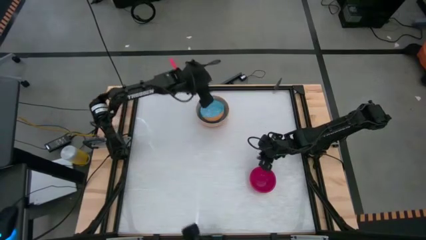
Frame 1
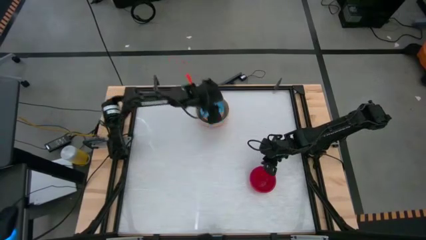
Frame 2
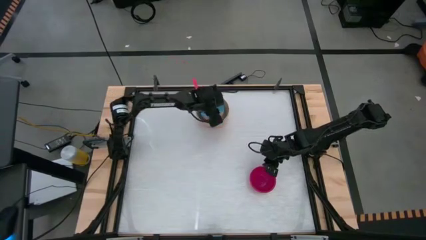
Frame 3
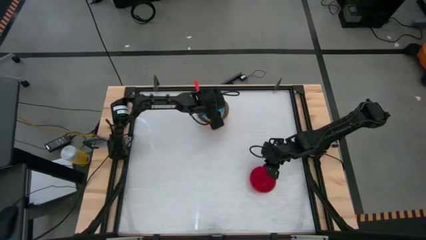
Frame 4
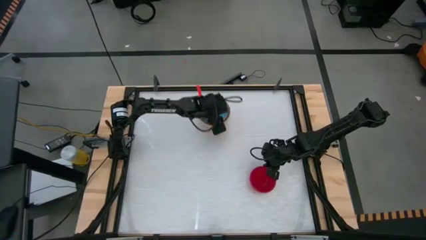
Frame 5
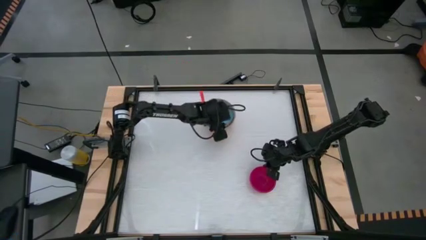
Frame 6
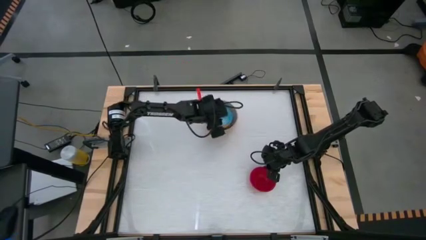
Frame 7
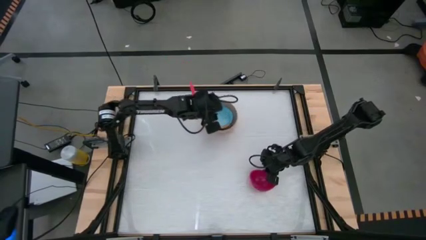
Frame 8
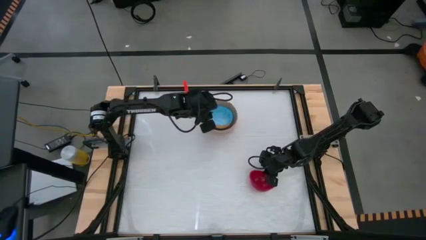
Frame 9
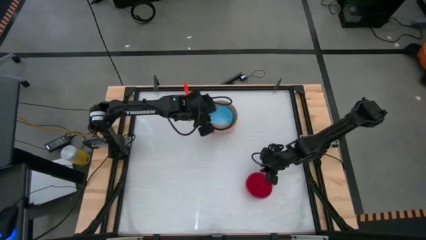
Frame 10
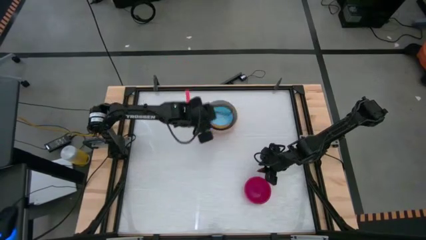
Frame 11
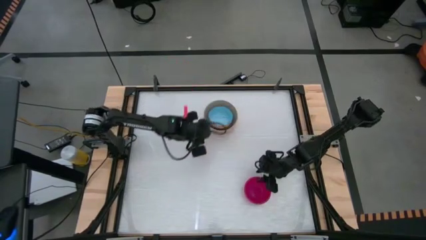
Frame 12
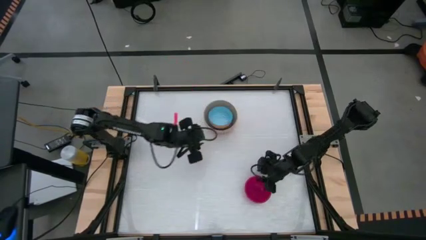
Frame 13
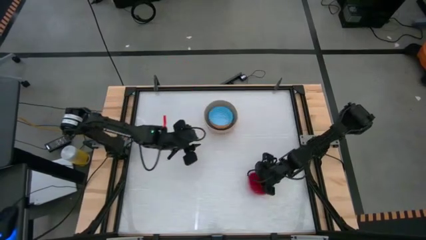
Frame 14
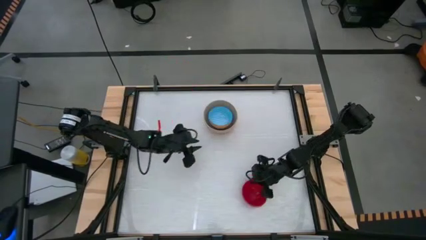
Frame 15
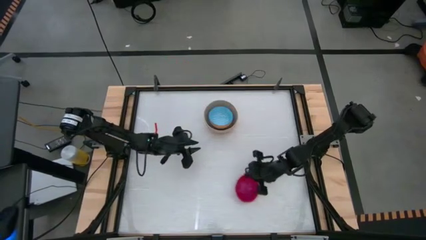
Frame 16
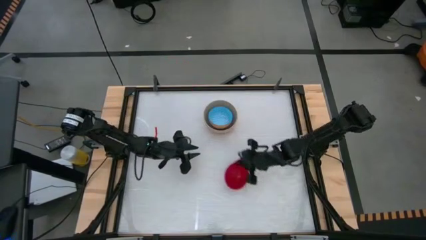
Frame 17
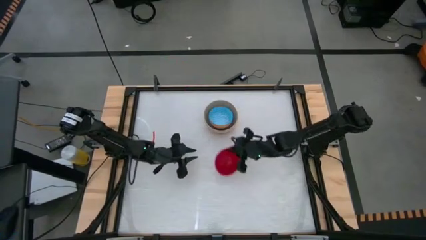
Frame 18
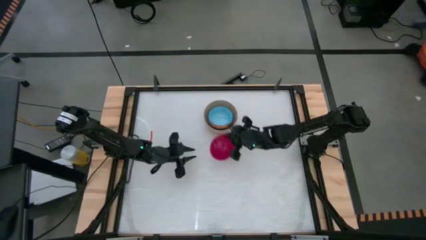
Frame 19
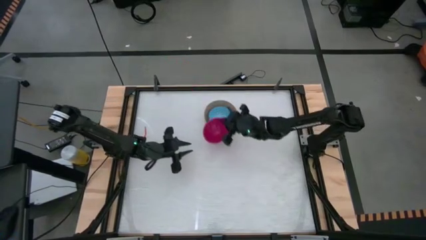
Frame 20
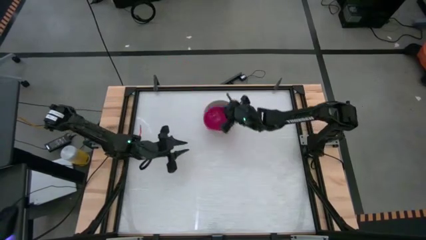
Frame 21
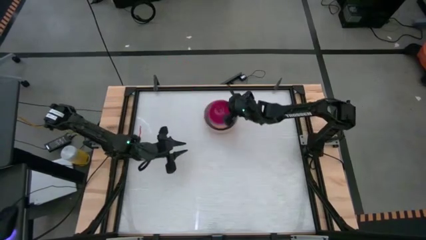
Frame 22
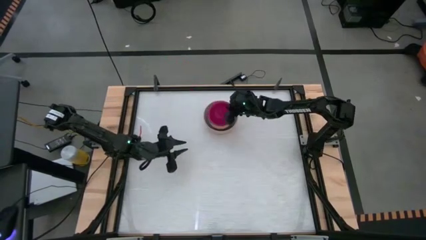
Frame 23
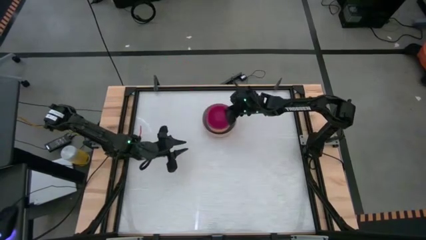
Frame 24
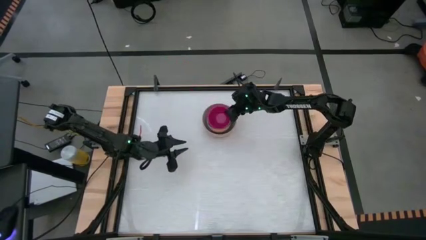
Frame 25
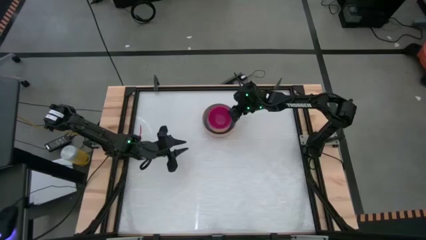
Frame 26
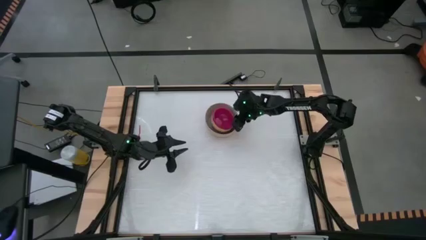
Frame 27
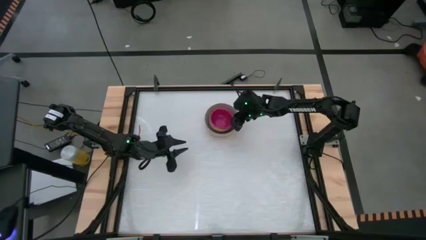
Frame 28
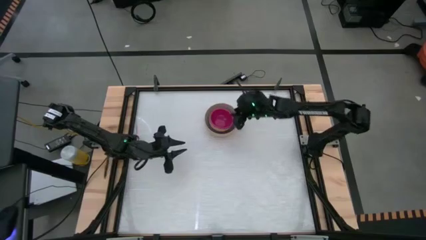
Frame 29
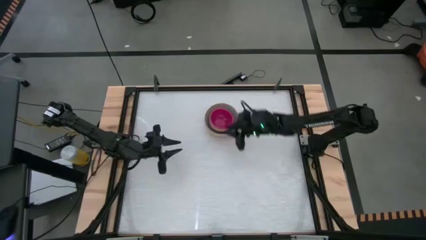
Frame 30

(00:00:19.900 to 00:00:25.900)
Stack the red bowl on top of the printed blue bowl

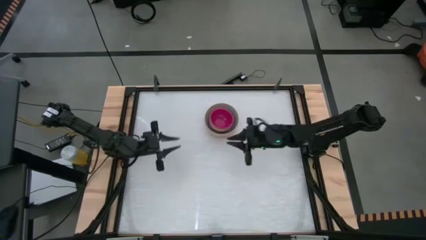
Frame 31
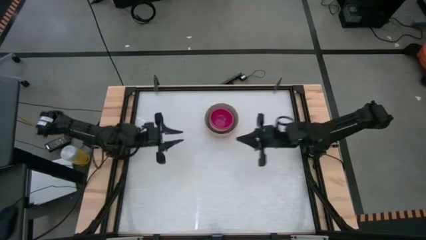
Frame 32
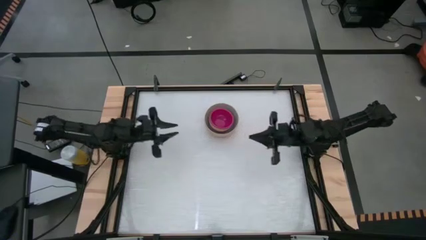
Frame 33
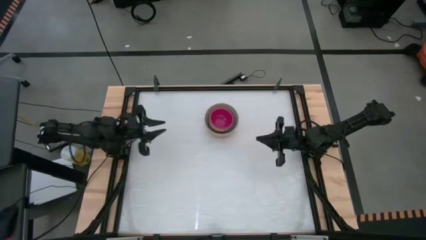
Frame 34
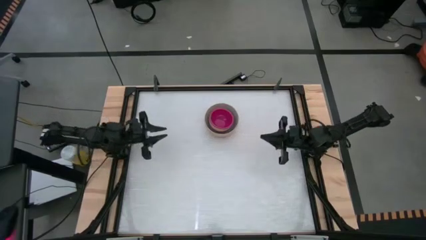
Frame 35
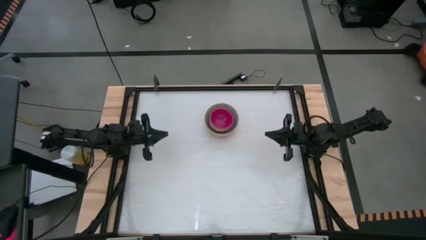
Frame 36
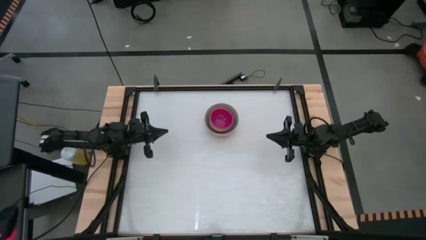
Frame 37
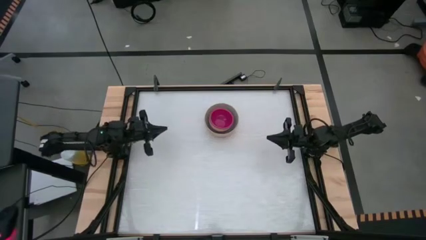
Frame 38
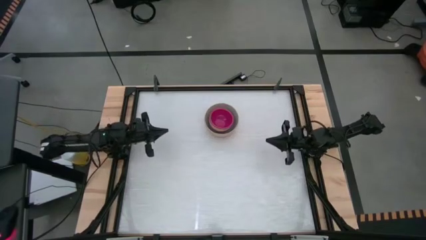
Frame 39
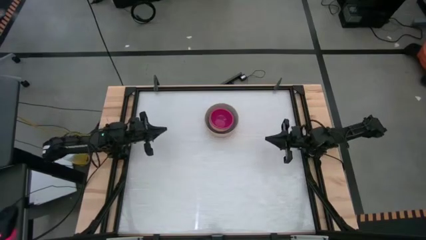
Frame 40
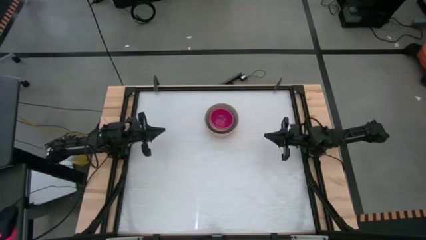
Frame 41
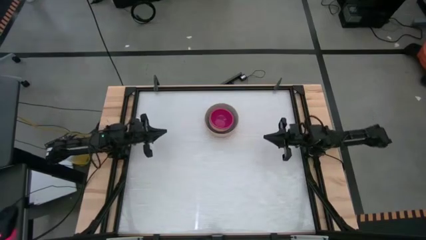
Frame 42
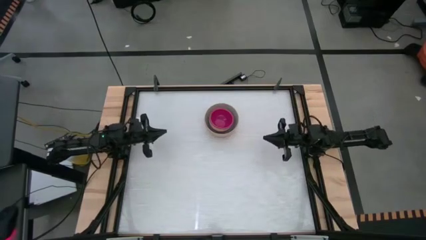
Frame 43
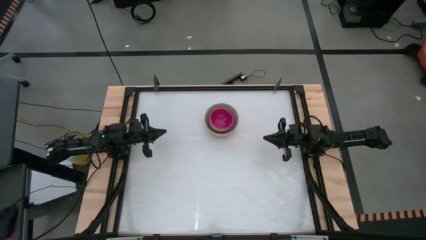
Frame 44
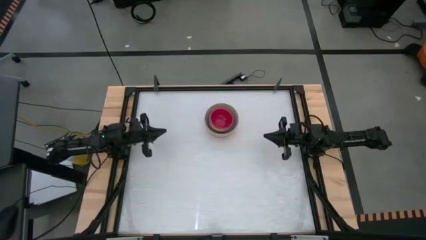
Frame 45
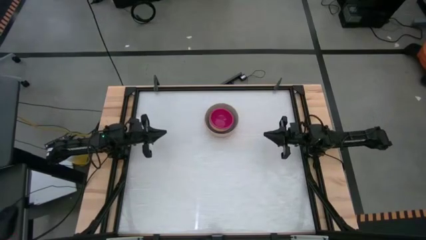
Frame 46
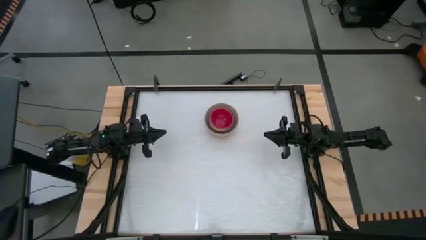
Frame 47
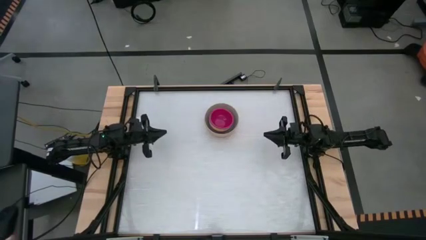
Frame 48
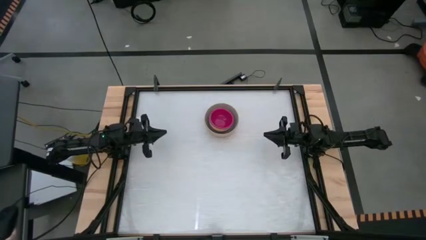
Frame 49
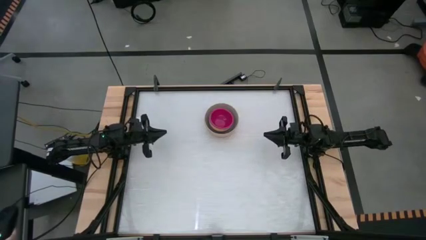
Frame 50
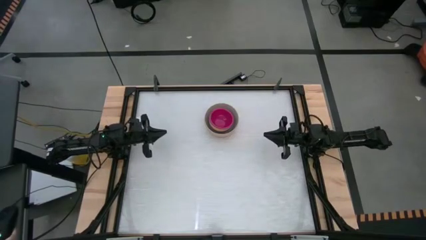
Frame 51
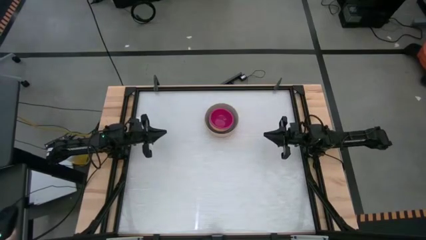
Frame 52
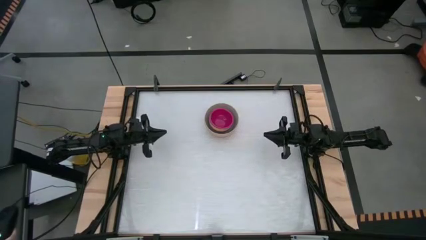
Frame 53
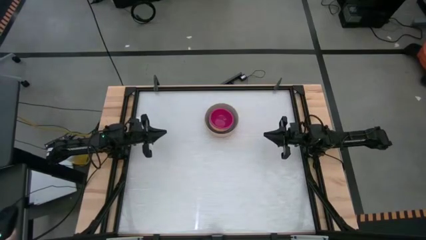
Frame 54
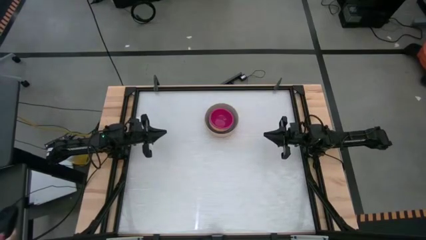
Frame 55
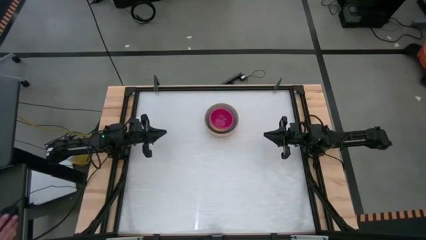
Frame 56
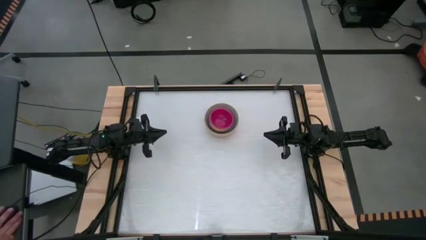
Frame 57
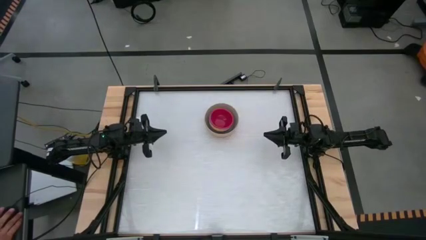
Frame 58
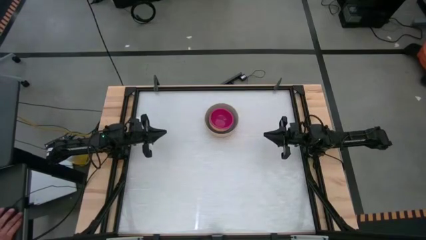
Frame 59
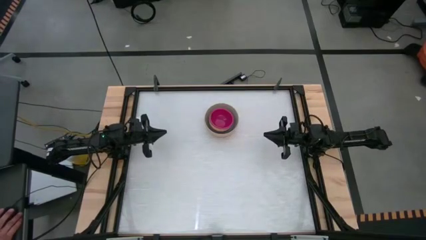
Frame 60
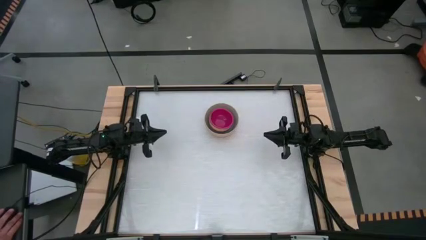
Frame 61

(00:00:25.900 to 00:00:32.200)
Return to Home Position
